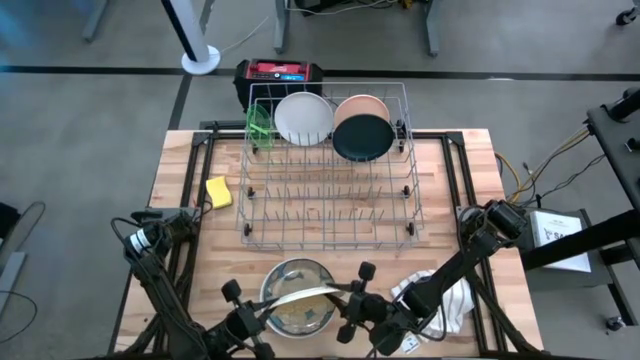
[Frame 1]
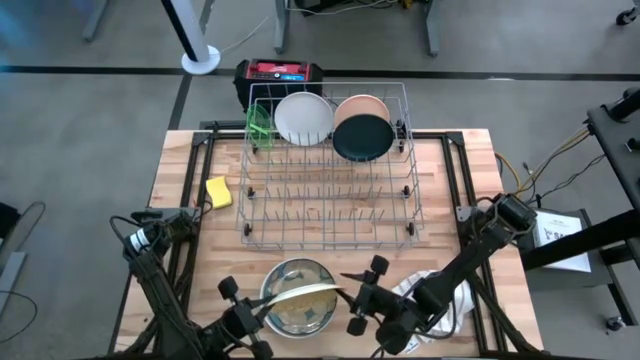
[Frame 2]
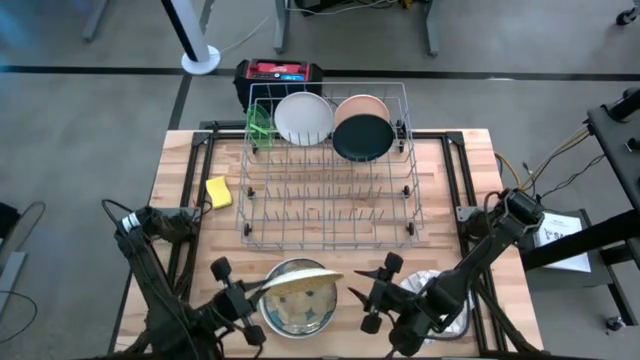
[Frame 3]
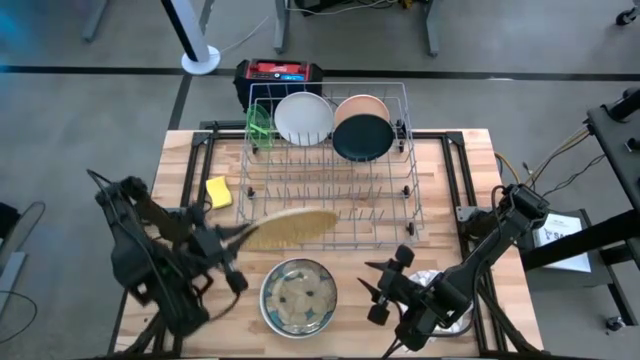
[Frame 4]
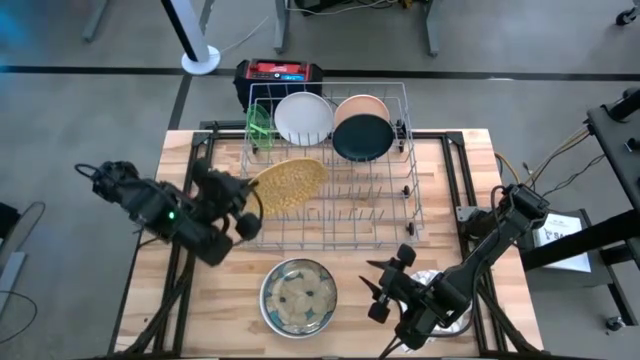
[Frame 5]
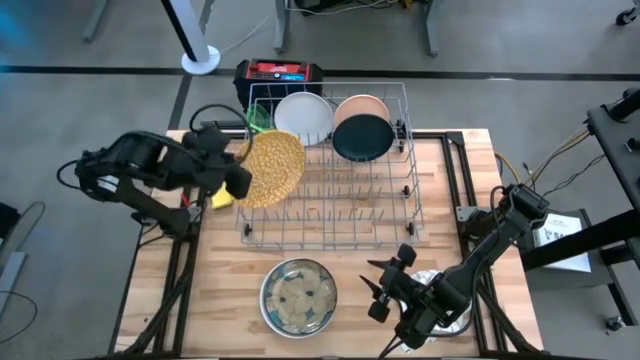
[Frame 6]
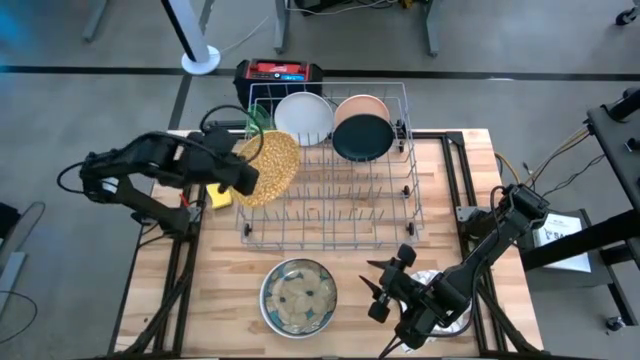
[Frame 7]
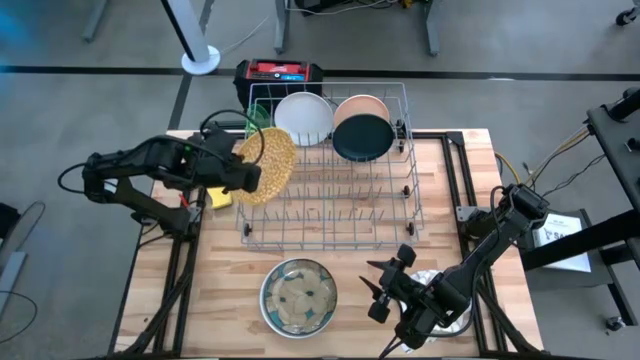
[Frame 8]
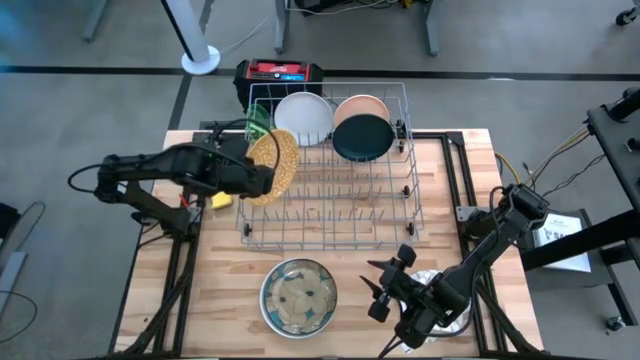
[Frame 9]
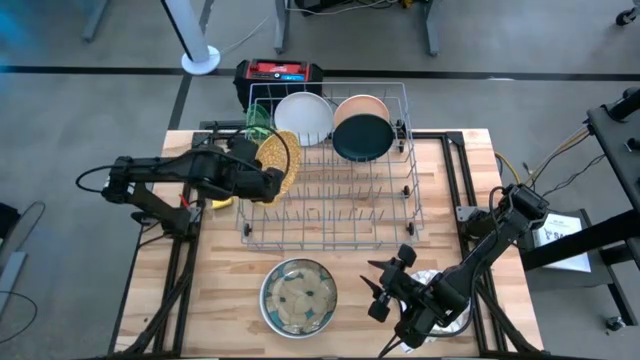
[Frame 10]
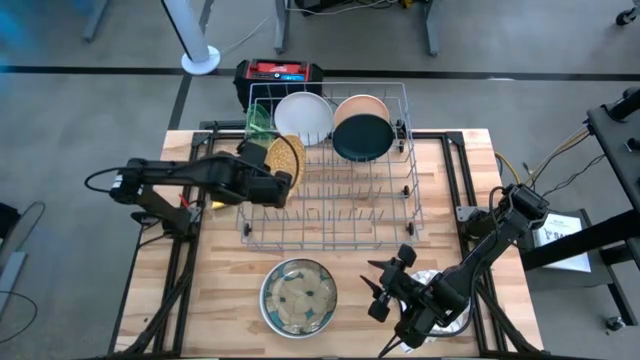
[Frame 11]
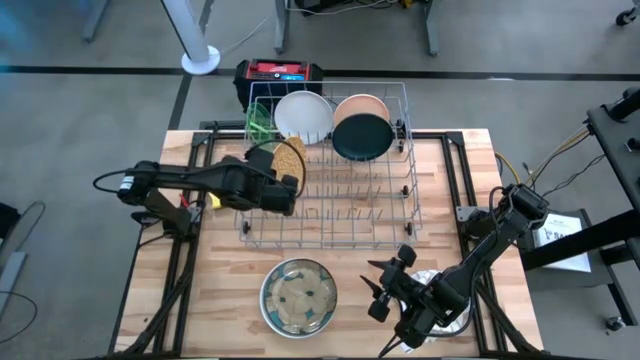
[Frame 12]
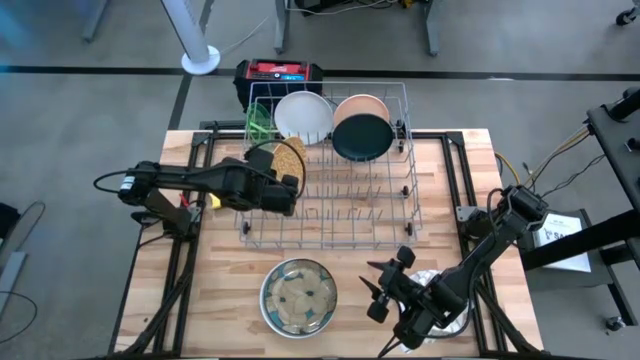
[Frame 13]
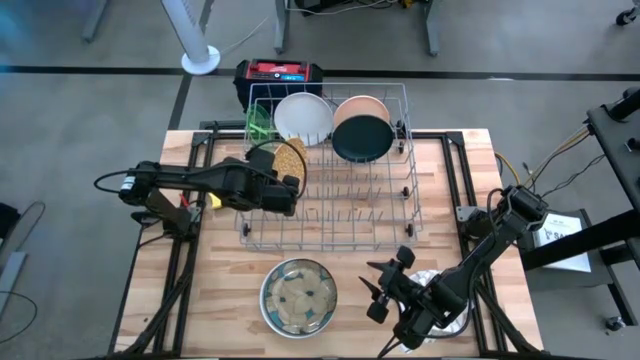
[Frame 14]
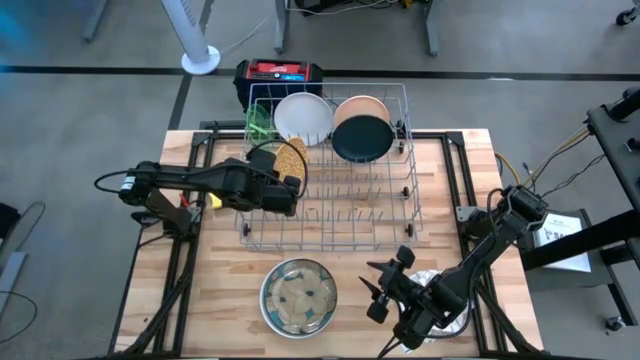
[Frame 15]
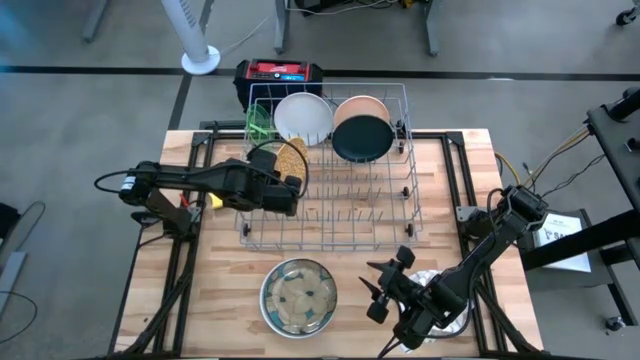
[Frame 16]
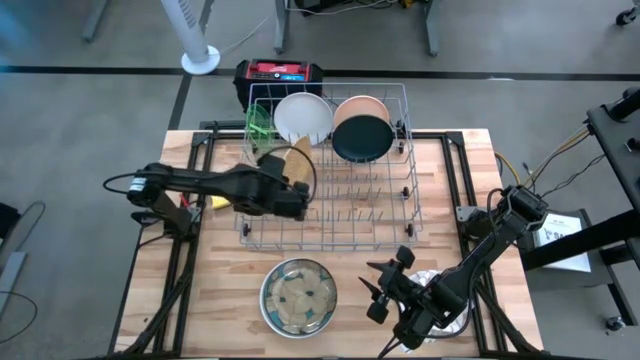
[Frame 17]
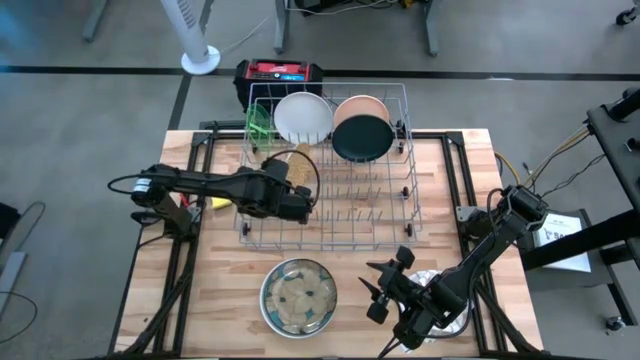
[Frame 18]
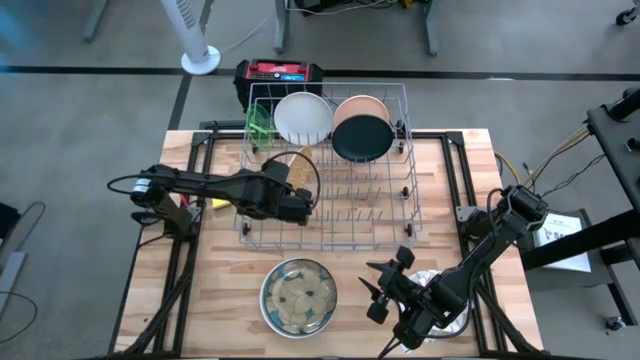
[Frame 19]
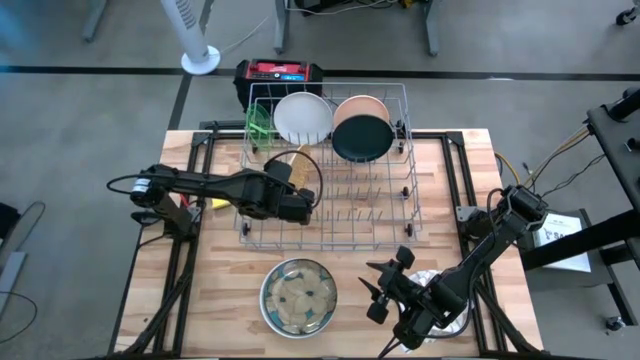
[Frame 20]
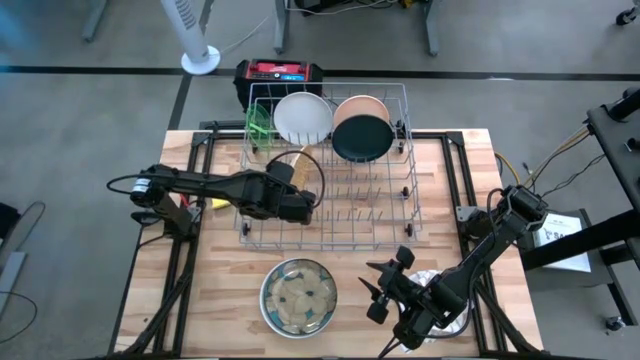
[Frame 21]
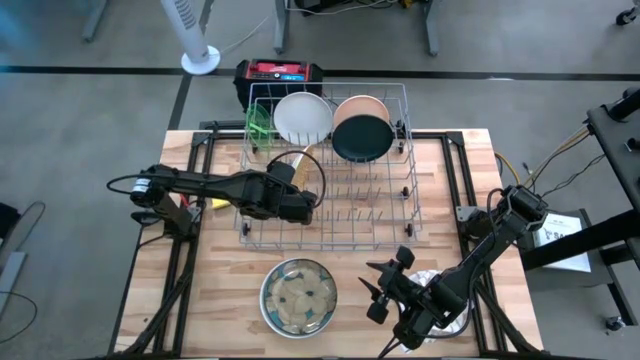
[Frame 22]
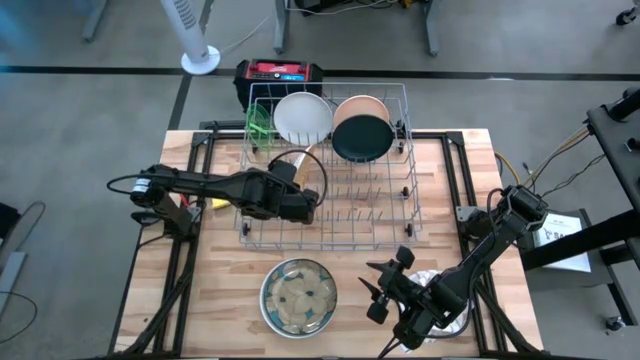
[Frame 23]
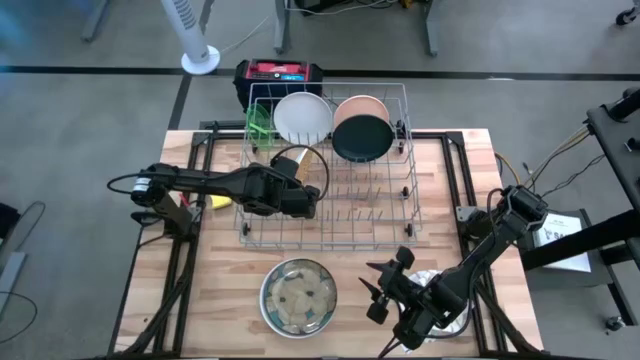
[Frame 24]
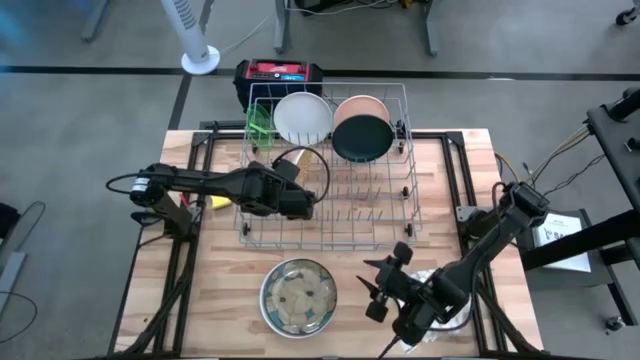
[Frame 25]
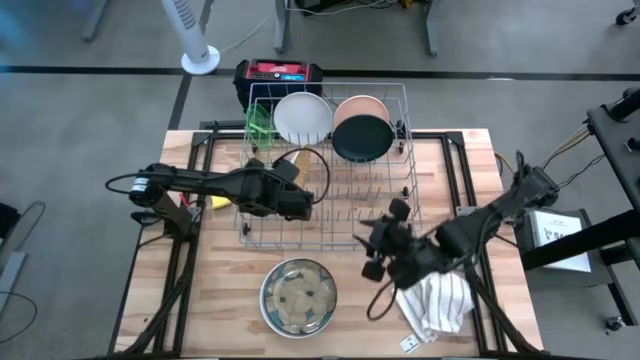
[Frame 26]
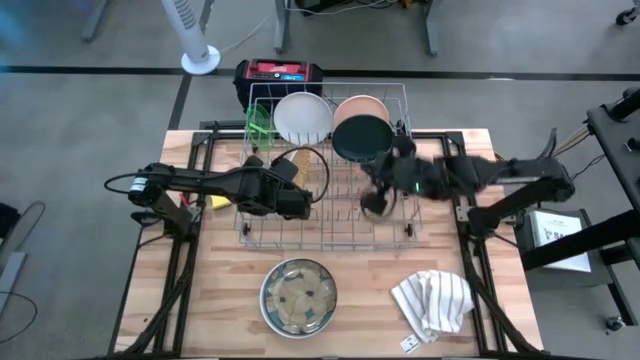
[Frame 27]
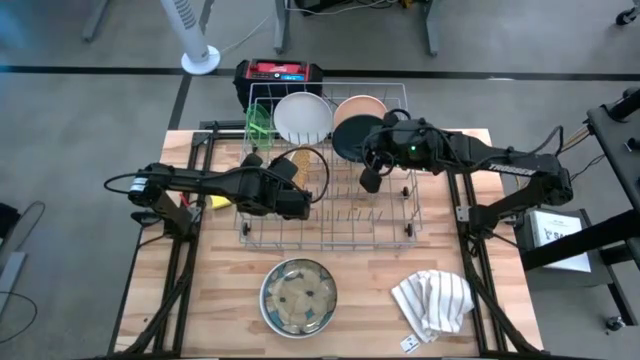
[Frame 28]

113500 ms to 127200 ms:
Task: Sort dishes
Put the yellow plate into the dish rack

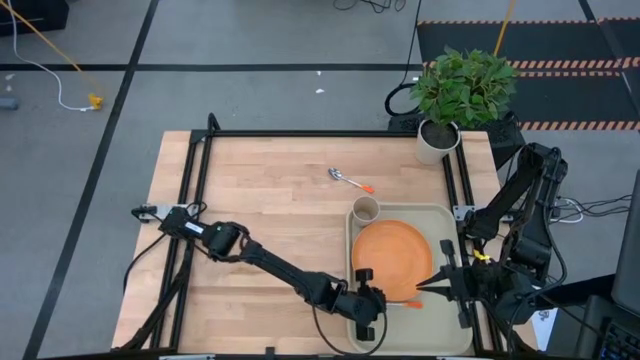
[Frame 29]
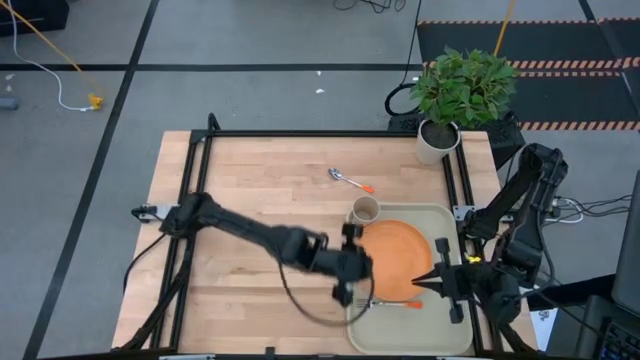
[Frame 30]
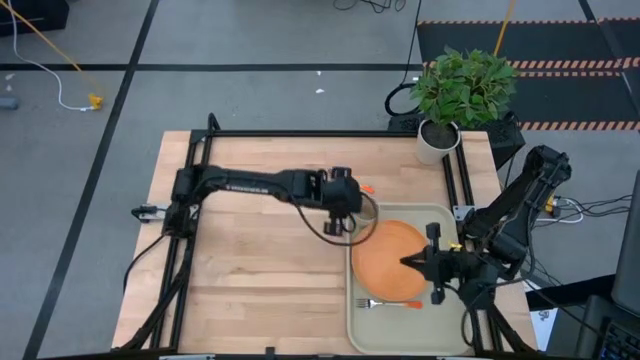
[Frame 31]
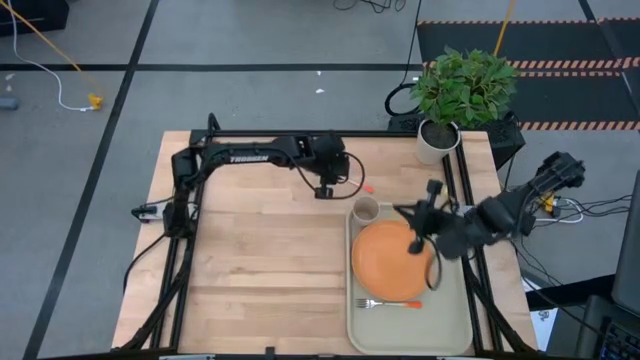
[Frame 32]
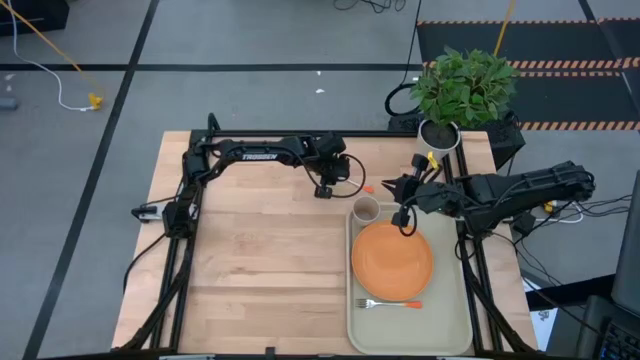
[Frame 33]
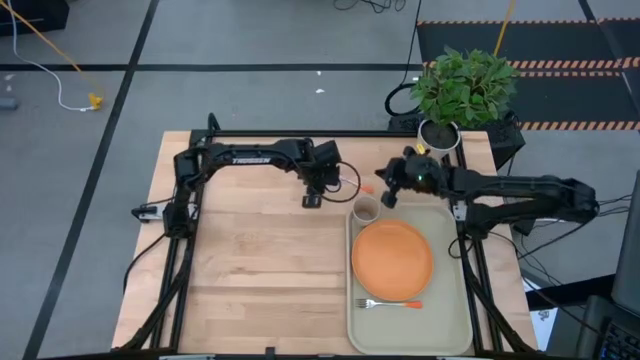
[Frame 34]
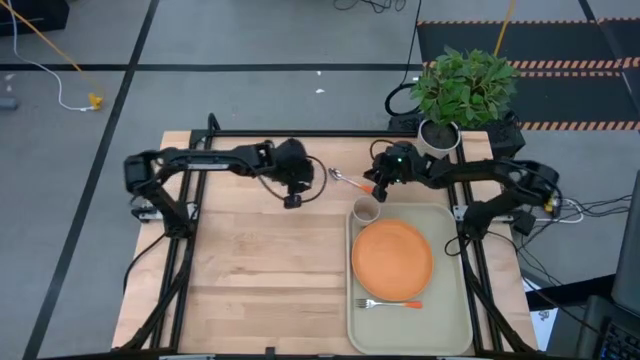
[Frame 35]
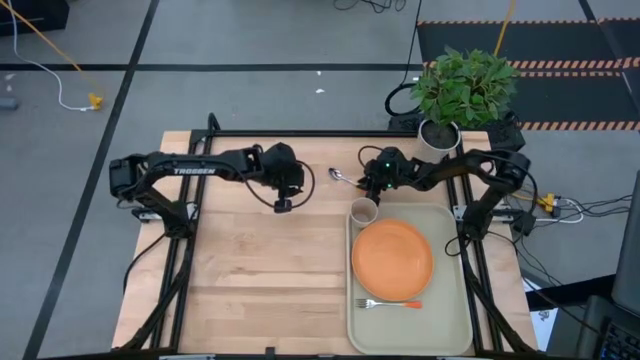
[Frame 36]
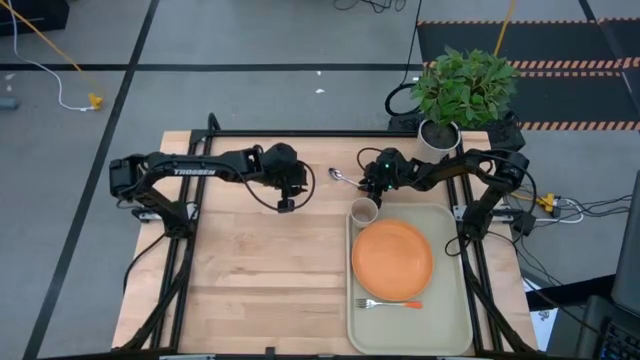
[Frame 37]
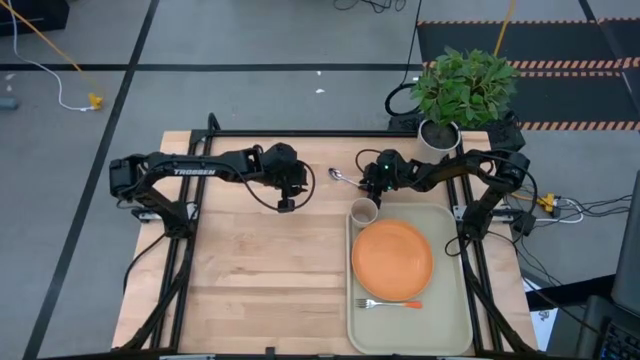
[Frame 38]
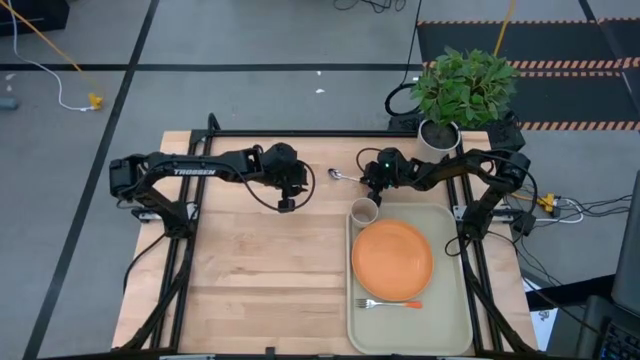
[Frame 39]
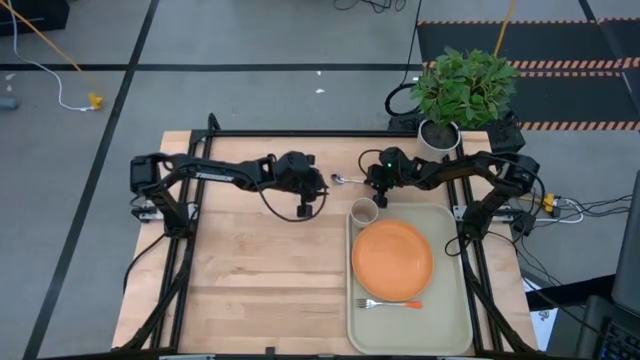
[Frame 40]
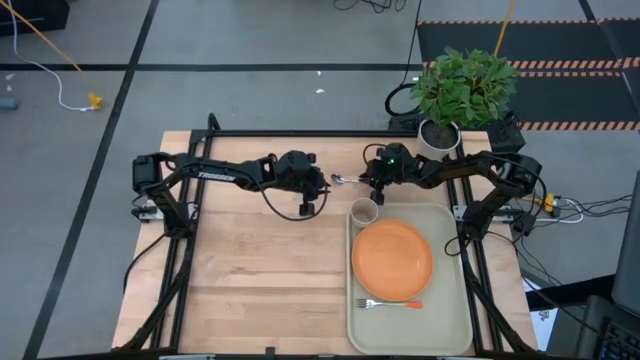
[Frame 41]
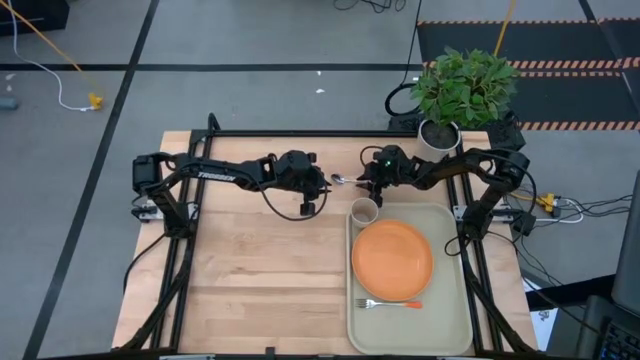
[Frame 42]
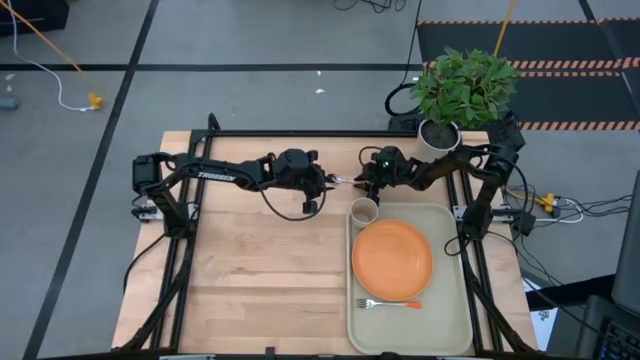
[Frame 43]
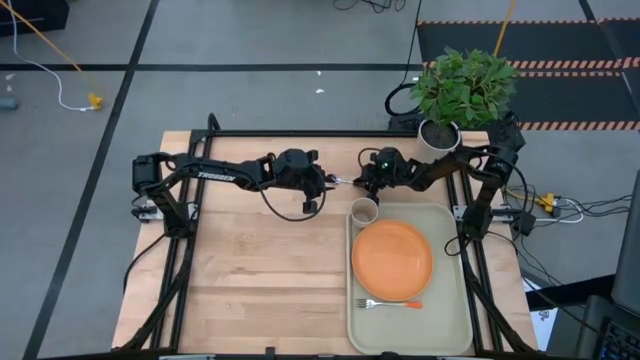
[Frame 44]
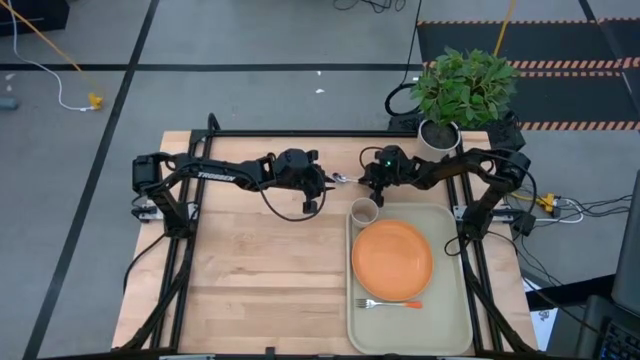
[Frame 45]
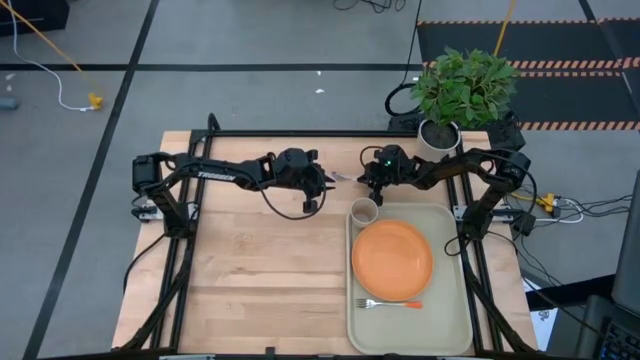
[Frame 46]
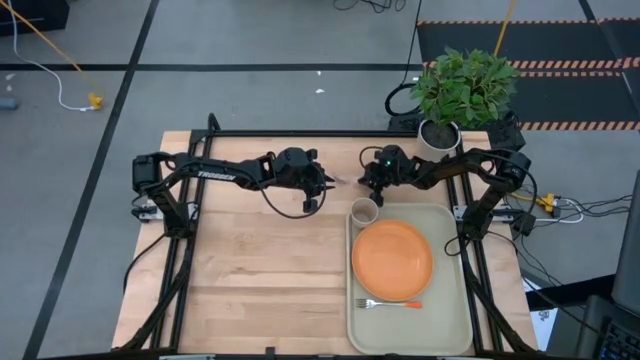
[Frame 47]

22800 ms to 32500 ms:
Task: Pick and place plate/cup/fork/spoon on tray
Put the white orange spoon on the left side of the white orange fork
